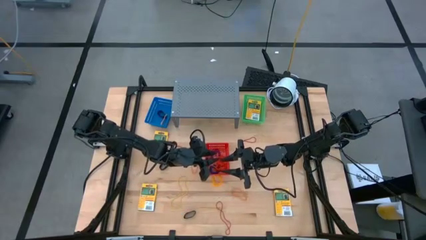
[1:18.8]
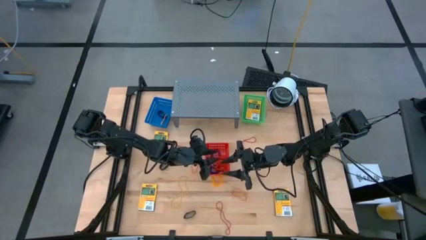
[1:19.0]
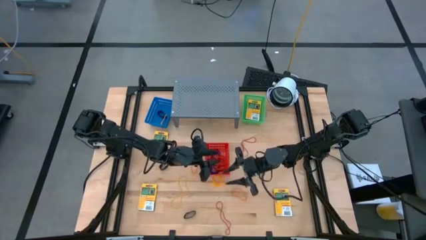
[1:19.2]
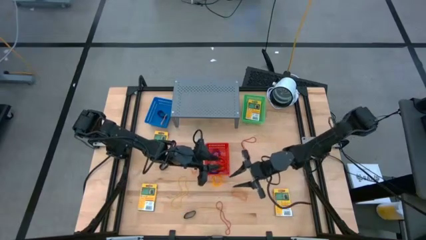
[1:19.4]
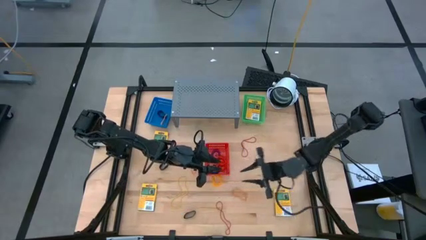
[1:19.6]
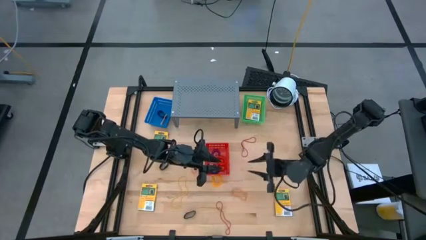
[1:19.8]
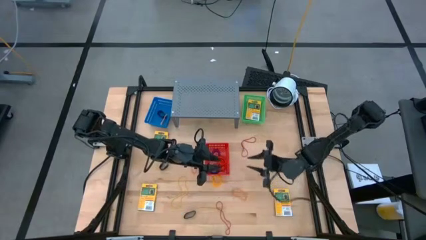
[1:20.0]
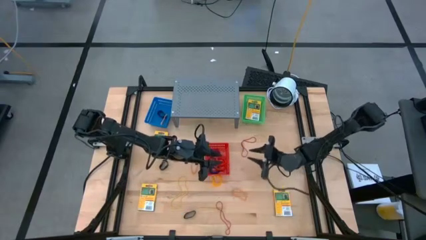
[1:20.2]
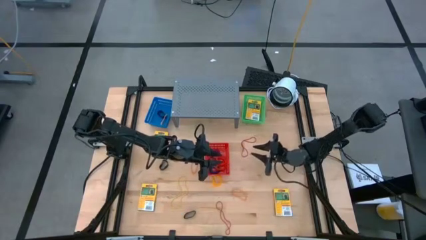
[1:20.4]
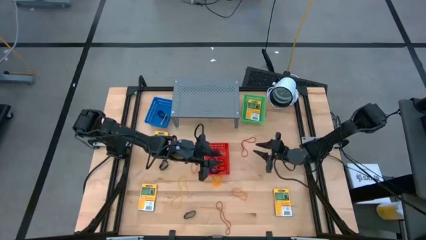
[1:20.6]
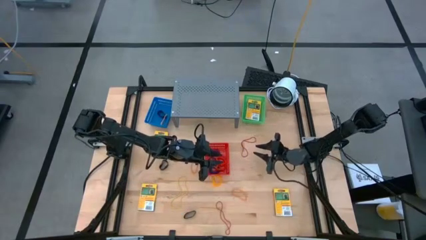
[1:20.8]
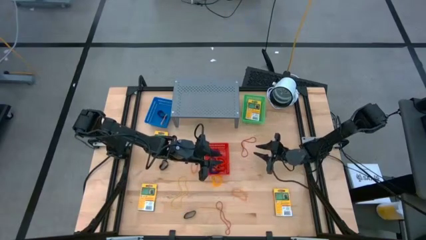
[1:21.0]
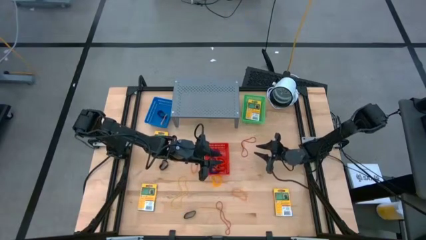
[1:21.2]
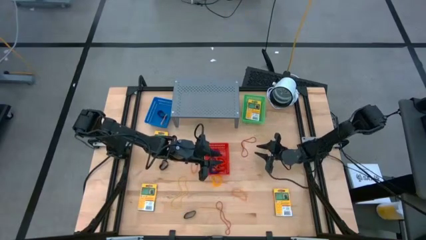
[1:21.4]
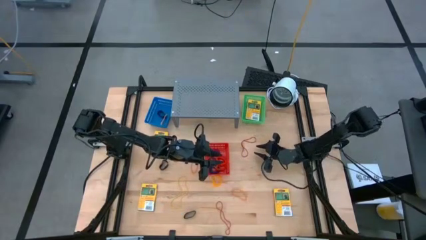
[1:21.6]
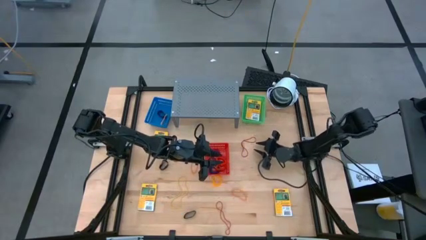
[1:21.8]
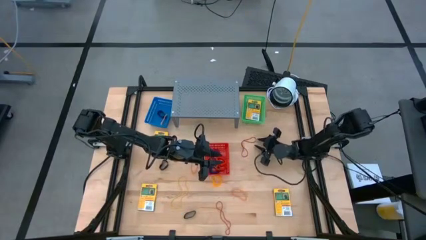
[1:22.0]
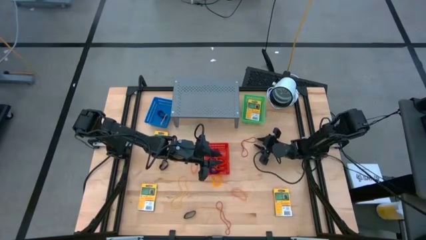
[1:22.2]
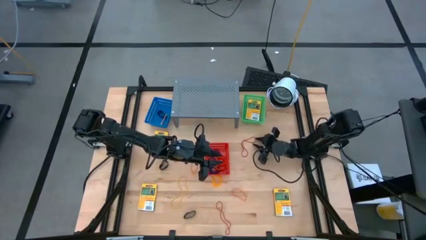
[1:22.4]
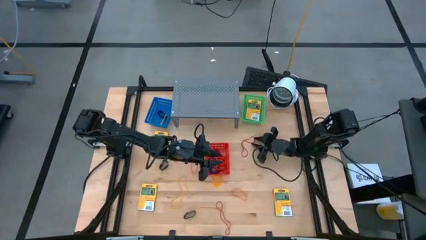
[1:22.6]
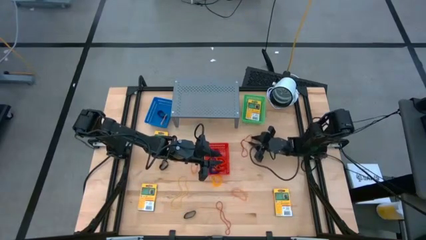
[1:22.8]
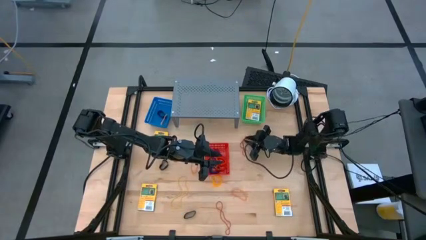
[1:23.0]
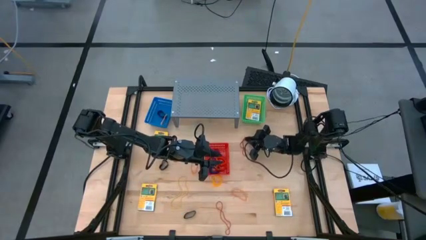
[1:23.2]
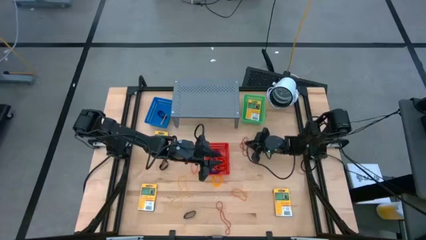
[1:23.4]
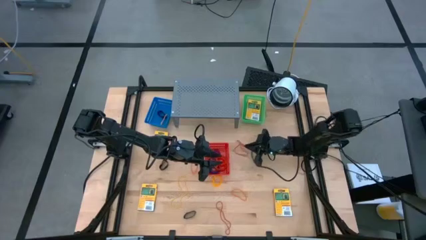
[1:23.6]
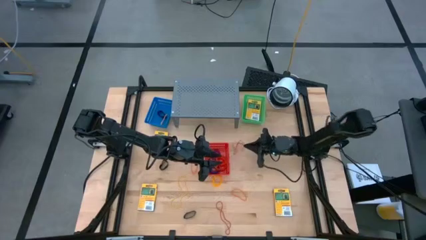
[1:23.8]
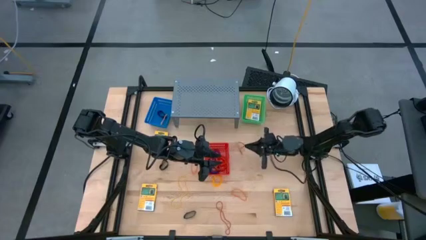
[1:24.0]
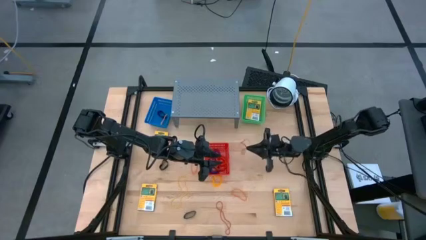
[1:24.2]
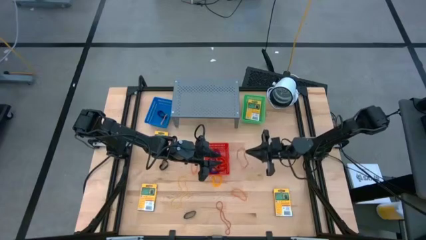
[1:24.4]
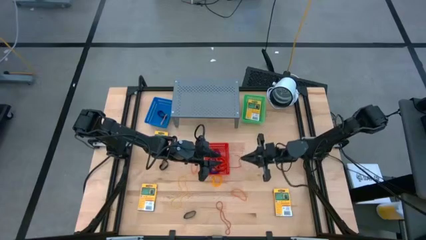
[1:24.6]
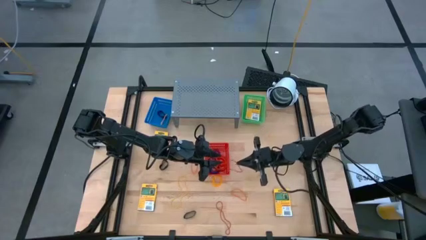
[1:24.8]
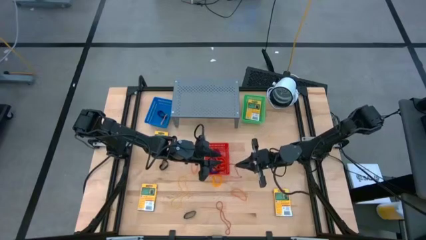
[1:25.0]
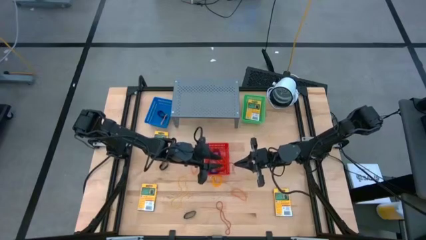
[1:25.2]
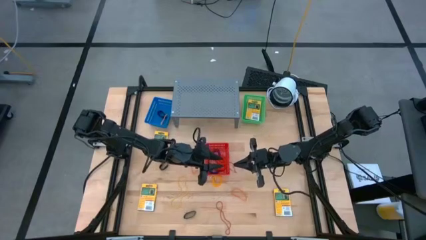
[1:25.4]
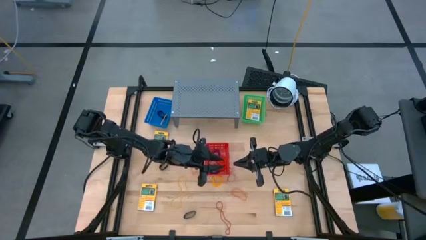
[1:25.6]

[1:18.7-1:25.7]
Task: Pick & Place Office Desk Supplies
Put the top right red rubber band into the blue basket

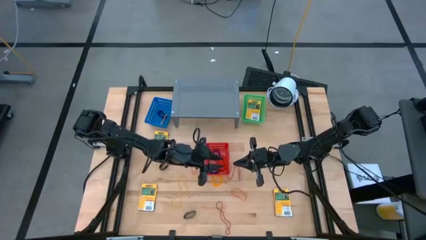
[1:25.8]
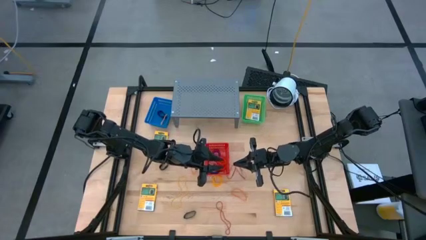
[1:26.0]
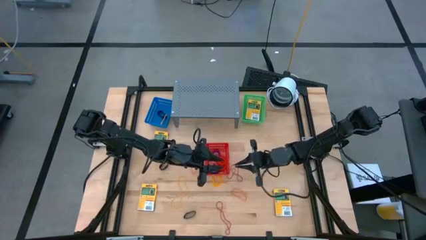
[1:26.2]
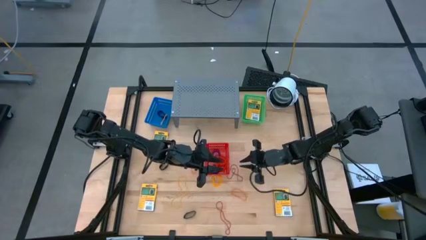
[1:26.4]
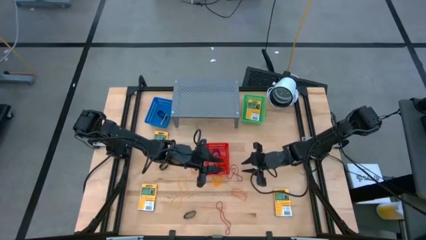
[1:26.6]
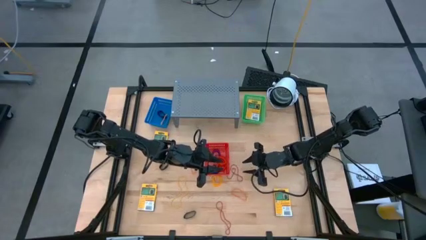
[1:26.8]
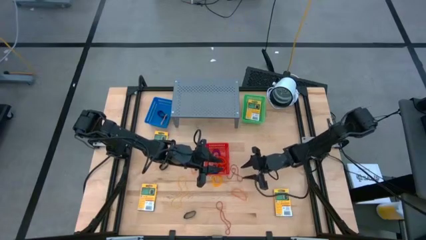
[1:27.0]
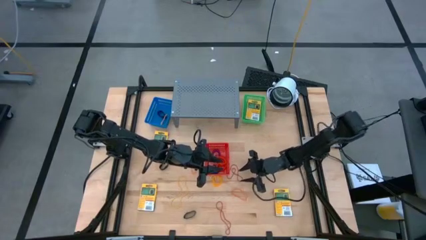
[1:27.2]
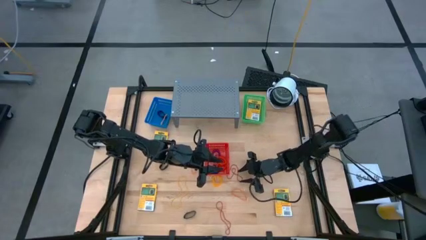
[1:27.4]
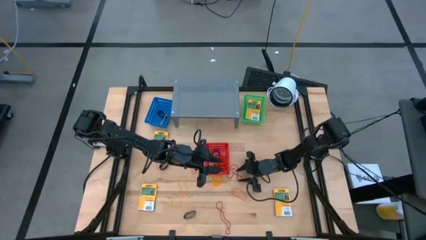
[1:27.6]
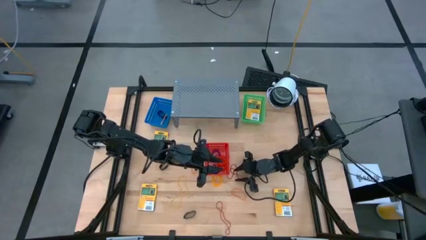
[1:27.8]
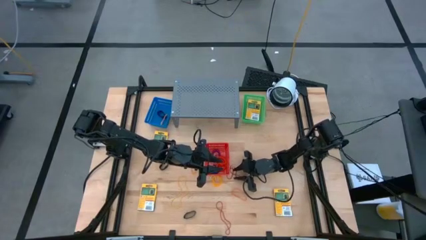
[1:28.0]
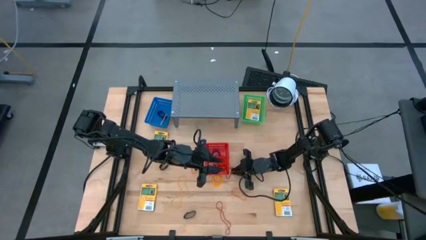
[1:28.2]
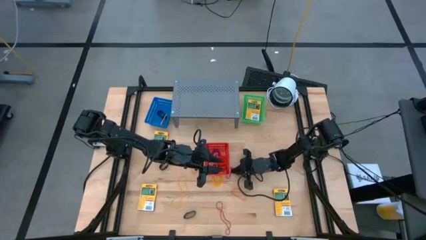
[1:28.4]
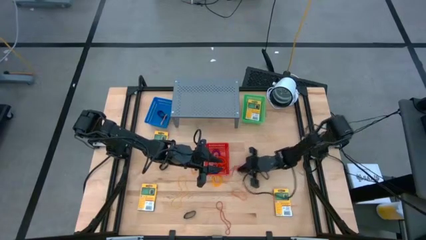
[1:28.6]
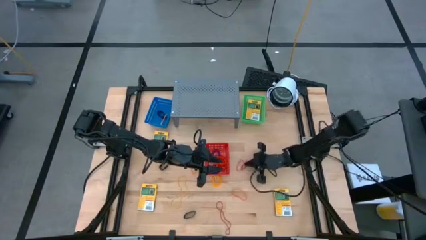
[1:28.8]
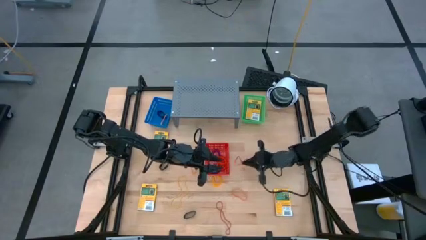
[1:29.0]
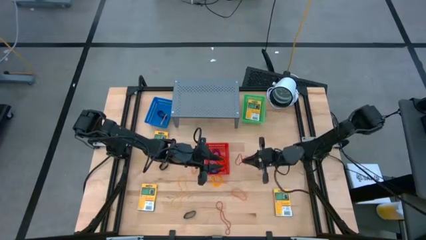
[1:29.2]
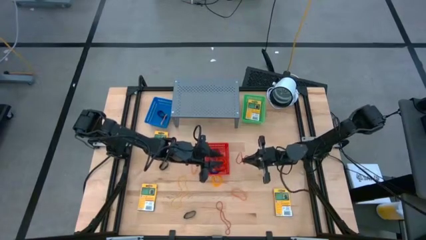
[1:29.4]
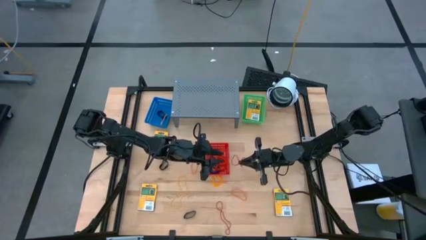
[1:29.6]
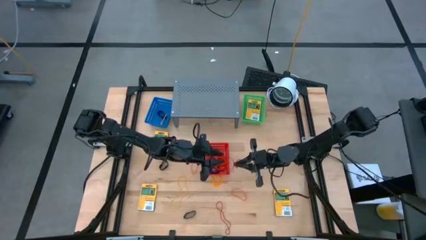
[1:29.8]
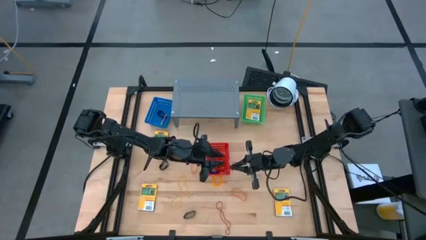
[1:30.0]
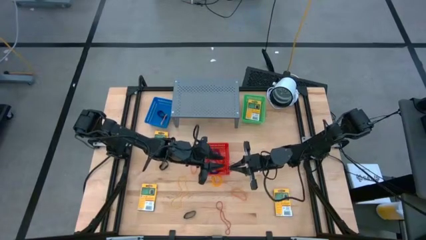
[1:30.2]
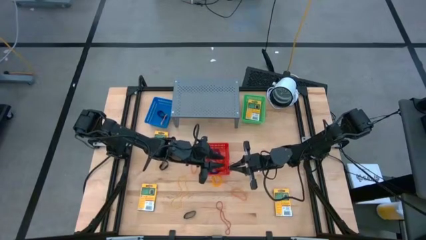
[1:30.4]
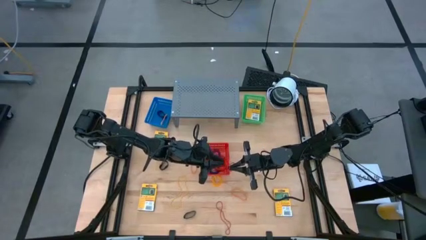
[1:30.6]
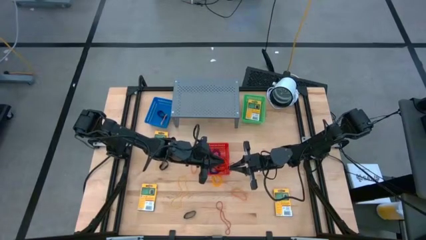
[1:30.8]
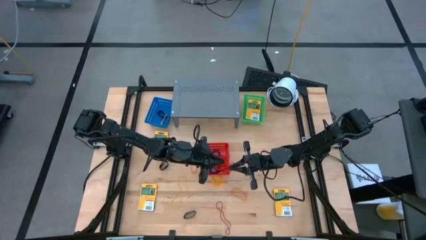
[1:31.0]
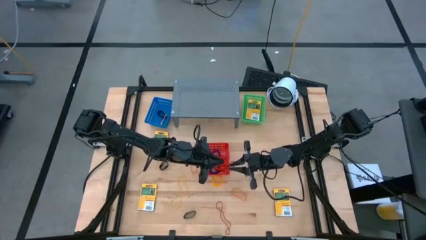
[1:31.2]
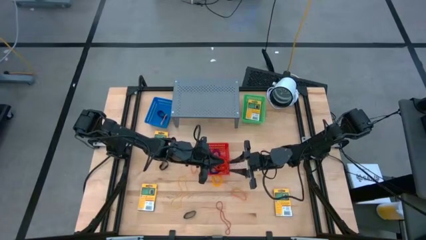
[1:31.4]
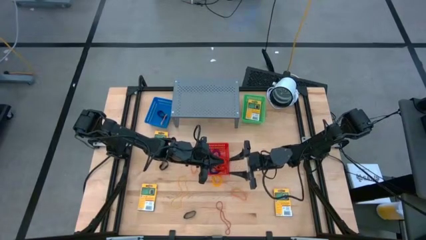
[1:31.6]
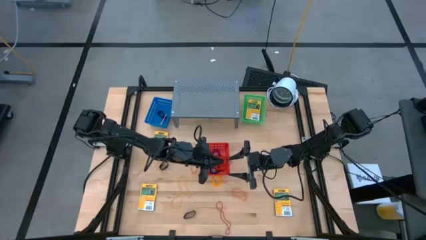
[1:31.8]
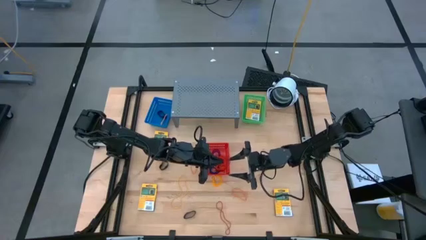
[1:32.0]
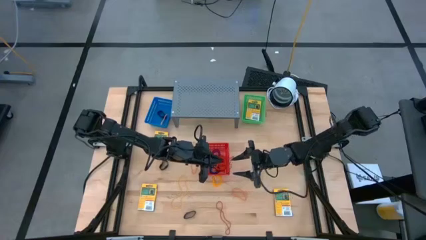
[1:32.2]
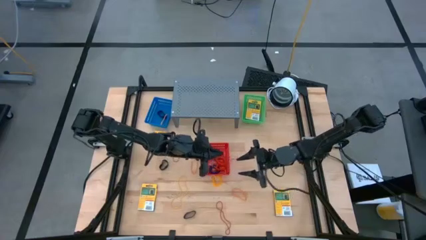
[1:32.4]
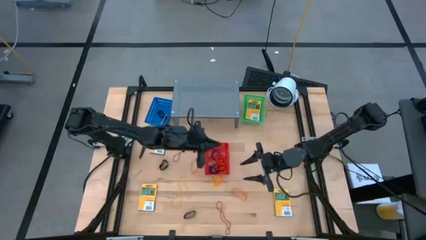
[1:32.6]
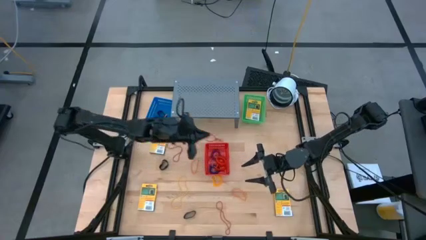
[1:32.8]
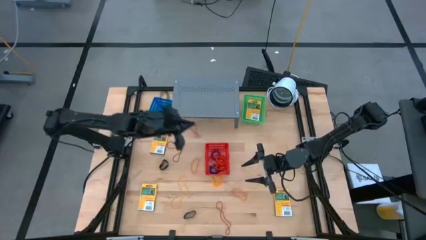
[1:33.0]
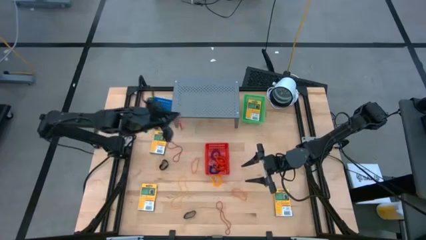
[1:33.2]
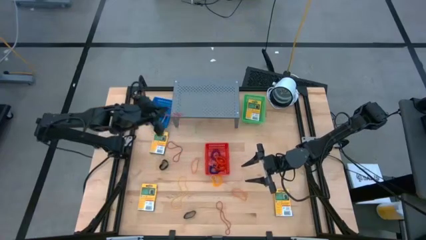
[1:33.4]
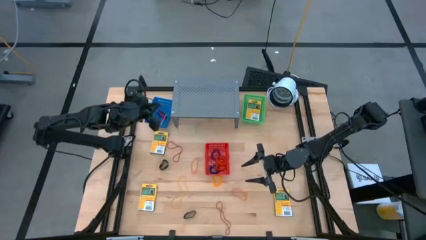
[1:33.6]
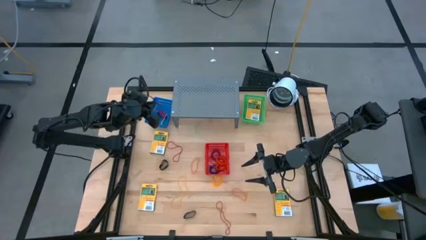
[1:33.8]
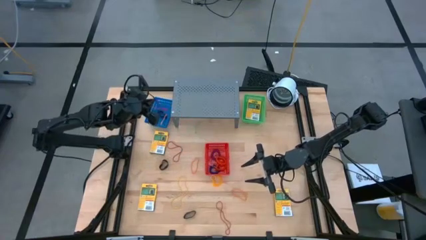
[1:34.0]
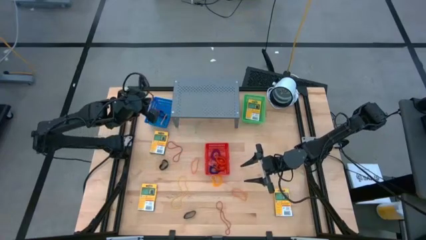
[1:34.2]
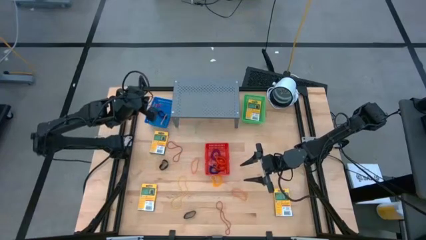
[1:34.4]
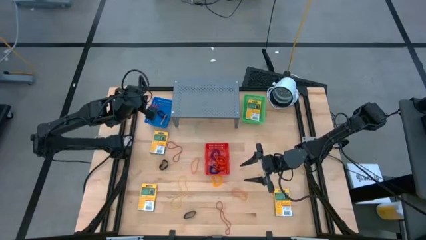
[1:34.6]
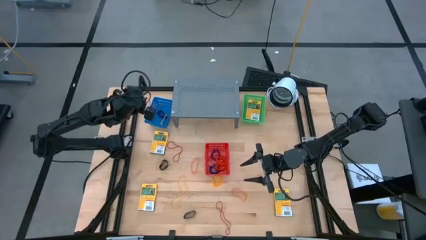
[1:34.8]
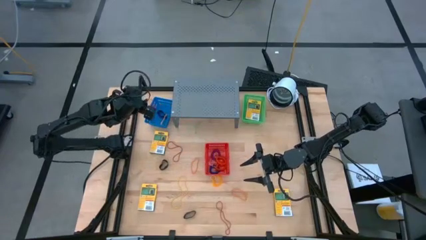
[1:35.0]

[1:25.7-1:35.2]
Put the top right red rubber band into the blue basket
